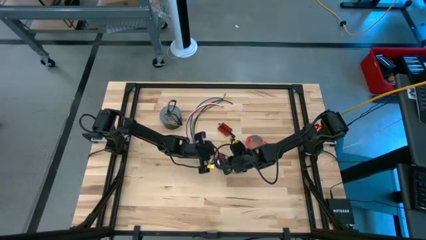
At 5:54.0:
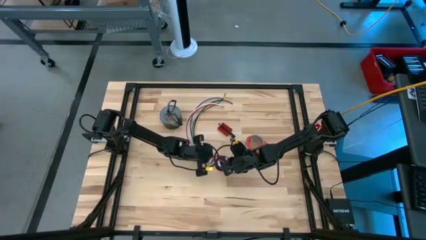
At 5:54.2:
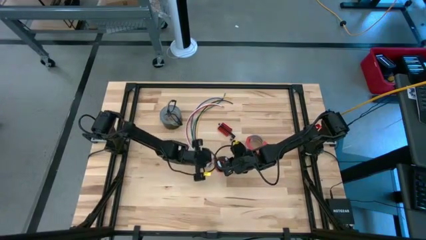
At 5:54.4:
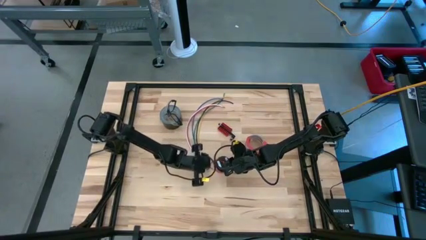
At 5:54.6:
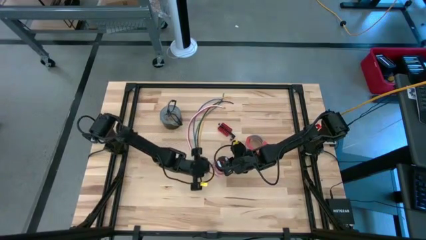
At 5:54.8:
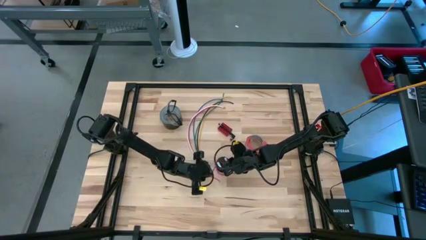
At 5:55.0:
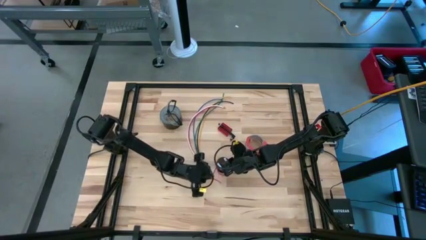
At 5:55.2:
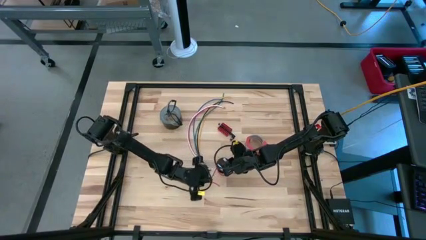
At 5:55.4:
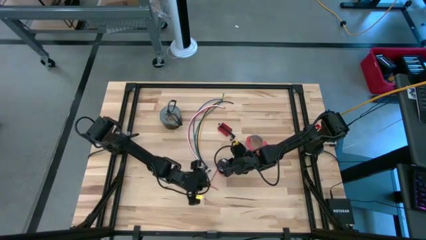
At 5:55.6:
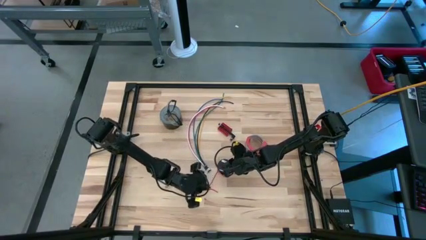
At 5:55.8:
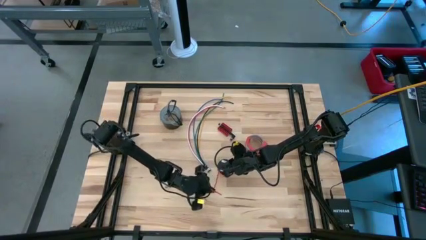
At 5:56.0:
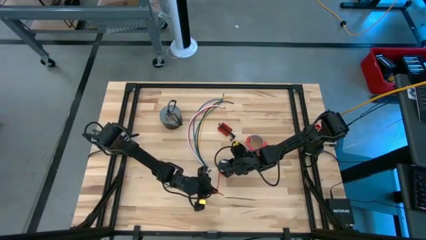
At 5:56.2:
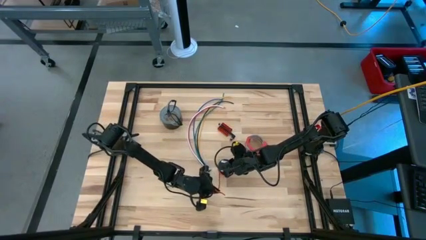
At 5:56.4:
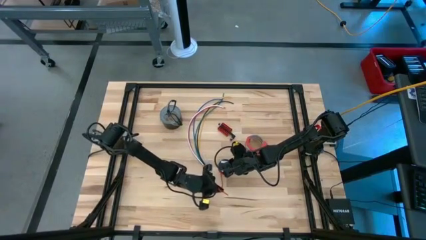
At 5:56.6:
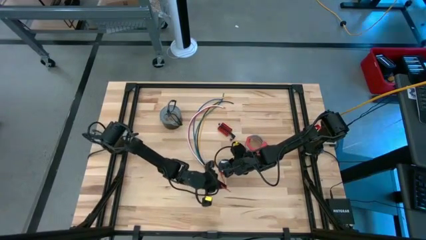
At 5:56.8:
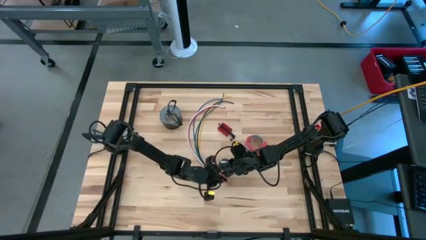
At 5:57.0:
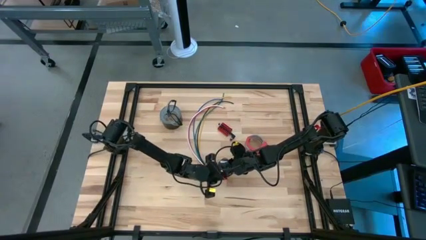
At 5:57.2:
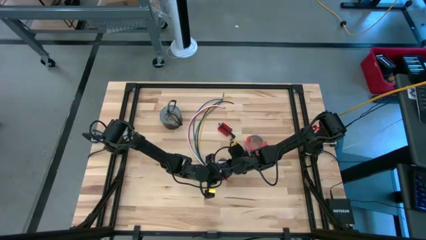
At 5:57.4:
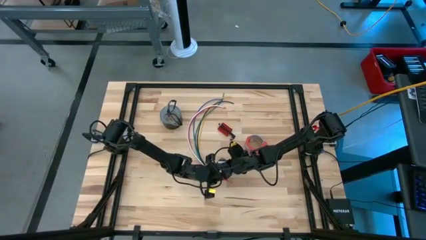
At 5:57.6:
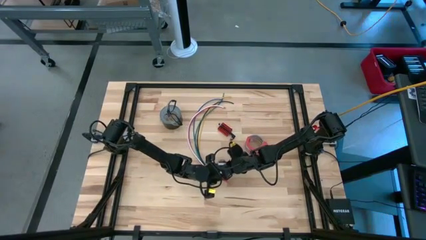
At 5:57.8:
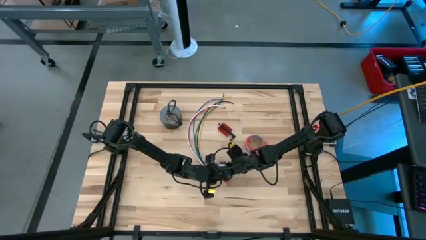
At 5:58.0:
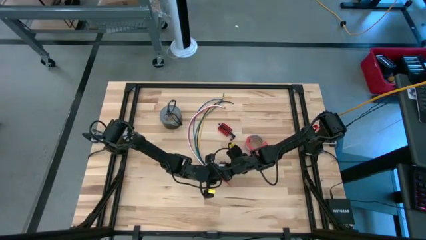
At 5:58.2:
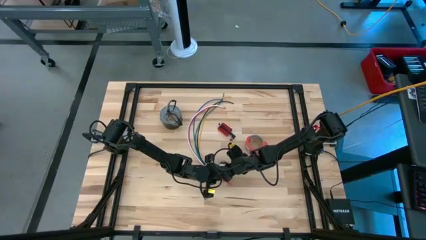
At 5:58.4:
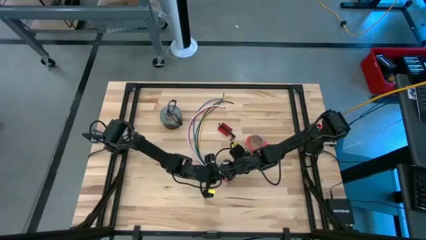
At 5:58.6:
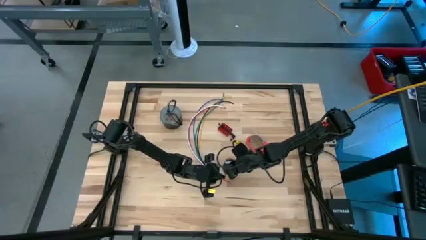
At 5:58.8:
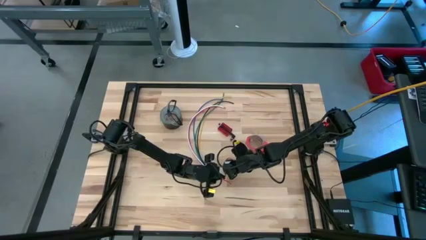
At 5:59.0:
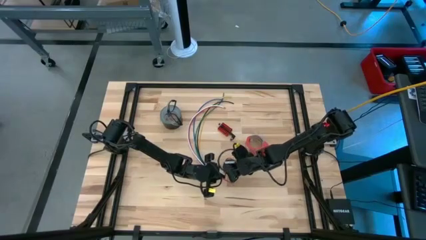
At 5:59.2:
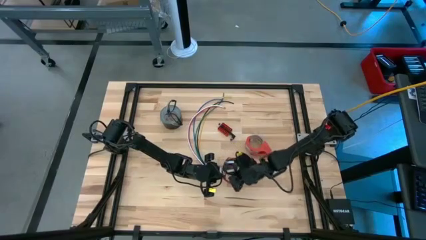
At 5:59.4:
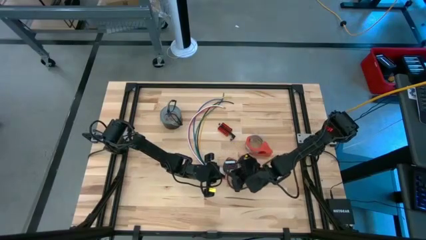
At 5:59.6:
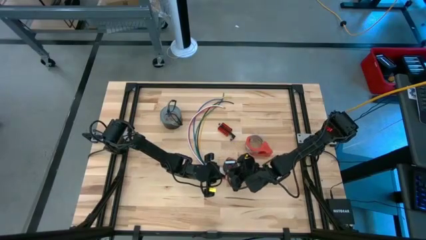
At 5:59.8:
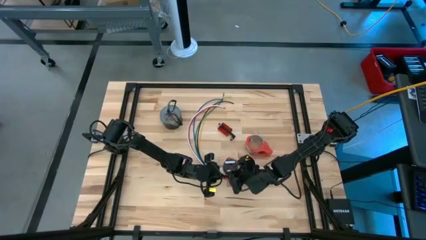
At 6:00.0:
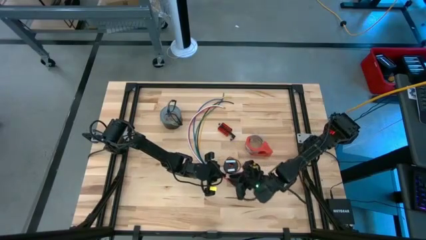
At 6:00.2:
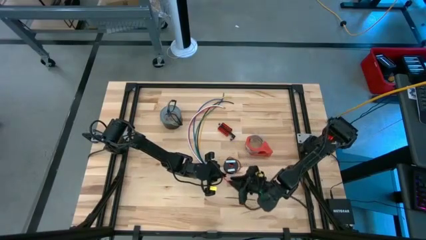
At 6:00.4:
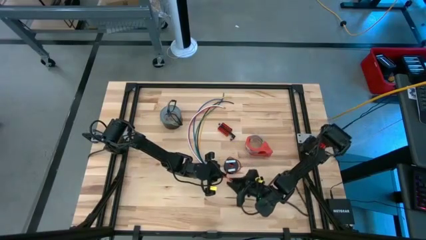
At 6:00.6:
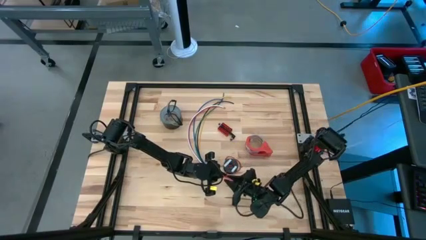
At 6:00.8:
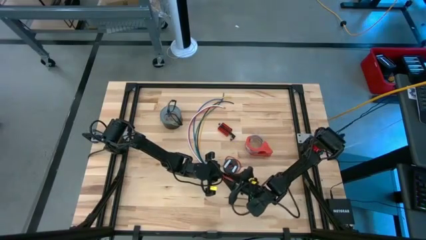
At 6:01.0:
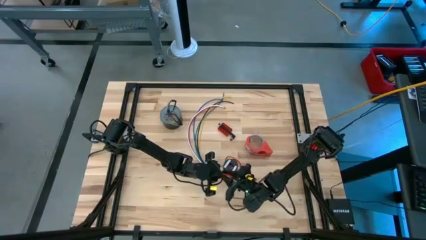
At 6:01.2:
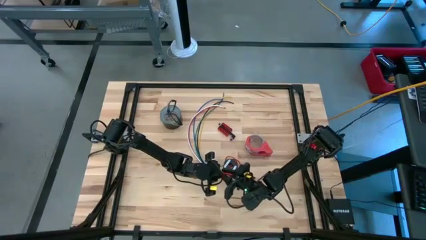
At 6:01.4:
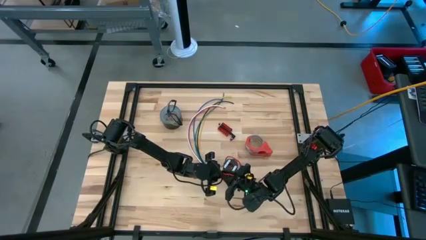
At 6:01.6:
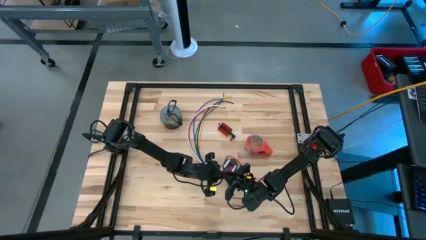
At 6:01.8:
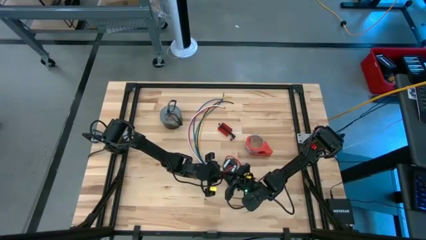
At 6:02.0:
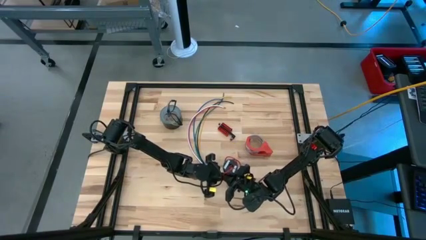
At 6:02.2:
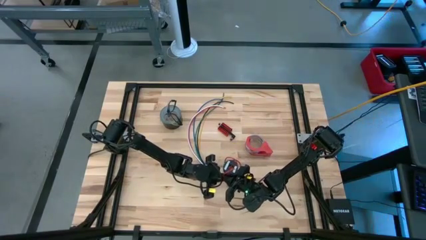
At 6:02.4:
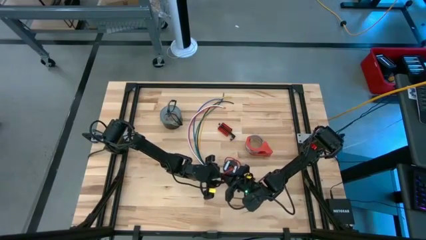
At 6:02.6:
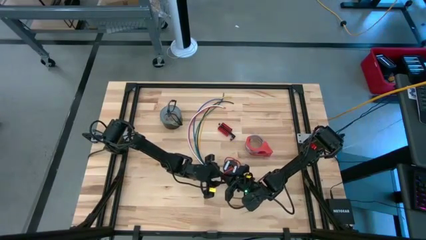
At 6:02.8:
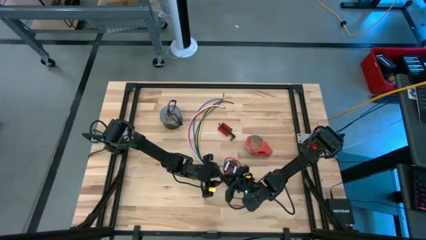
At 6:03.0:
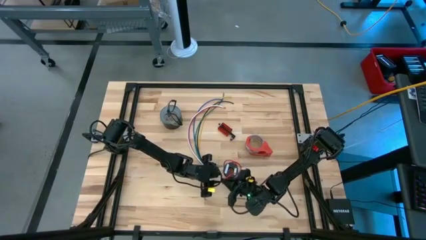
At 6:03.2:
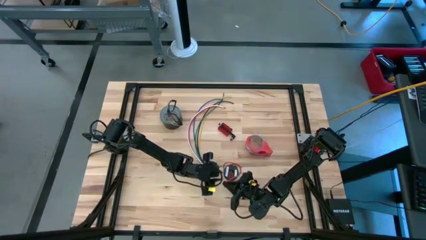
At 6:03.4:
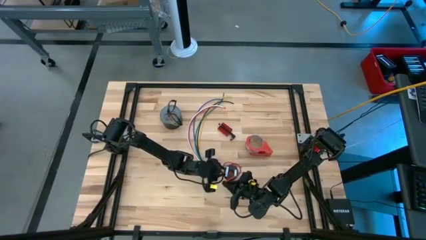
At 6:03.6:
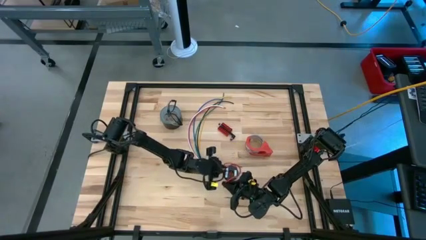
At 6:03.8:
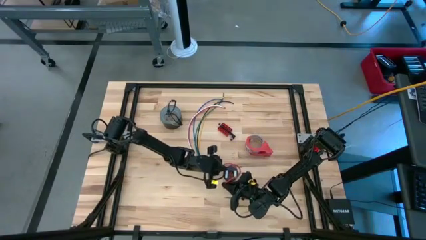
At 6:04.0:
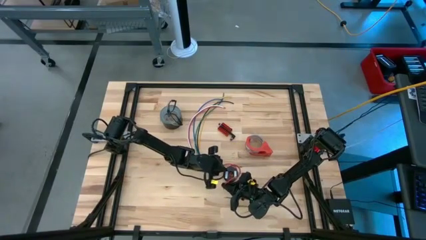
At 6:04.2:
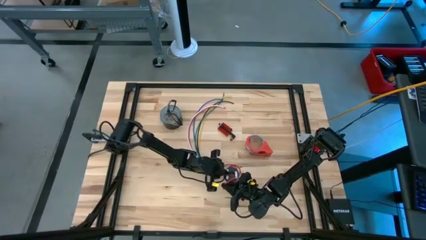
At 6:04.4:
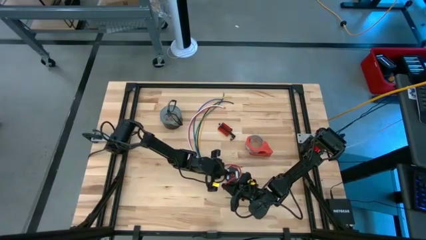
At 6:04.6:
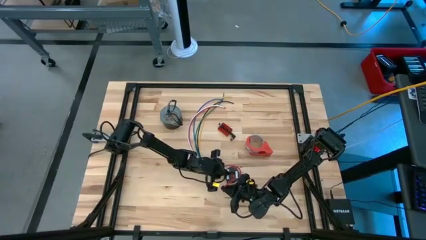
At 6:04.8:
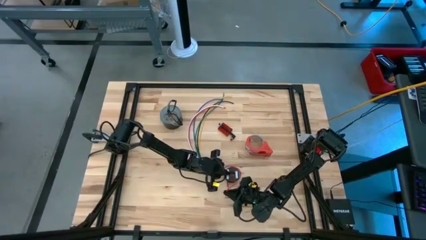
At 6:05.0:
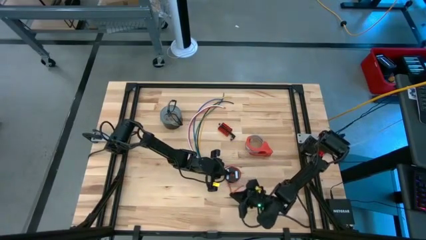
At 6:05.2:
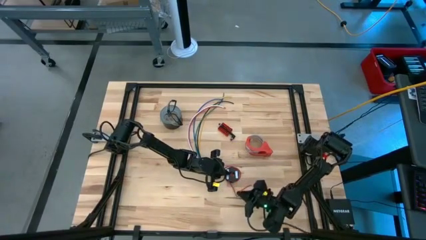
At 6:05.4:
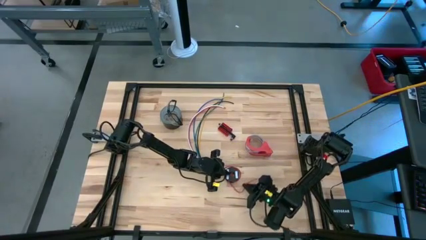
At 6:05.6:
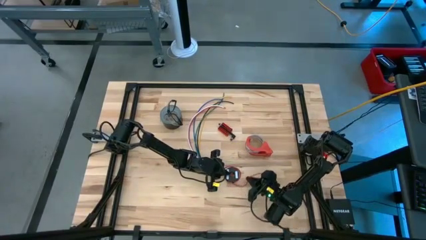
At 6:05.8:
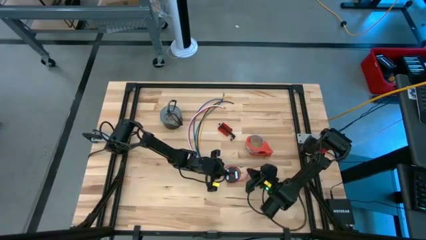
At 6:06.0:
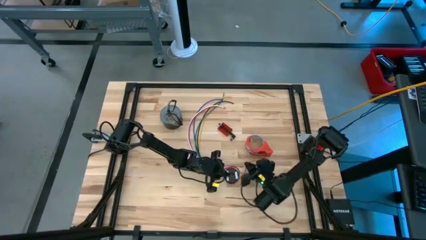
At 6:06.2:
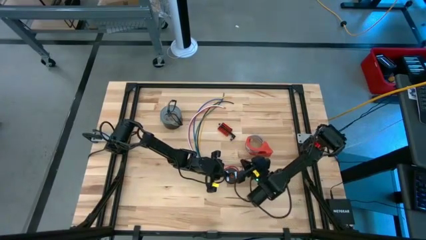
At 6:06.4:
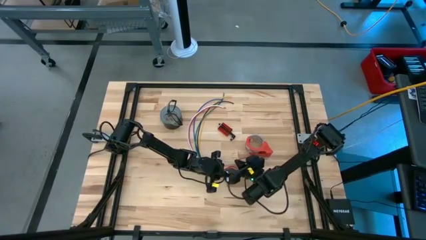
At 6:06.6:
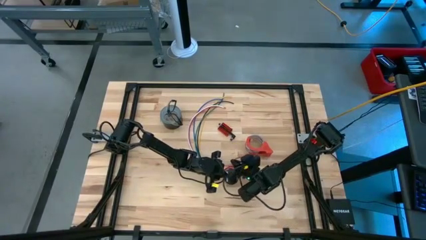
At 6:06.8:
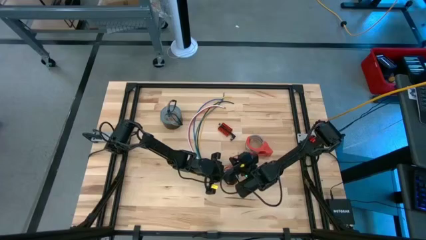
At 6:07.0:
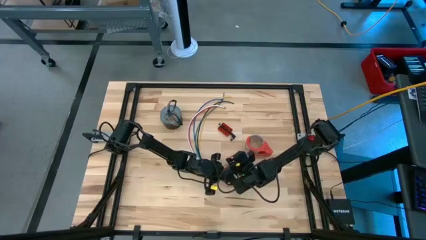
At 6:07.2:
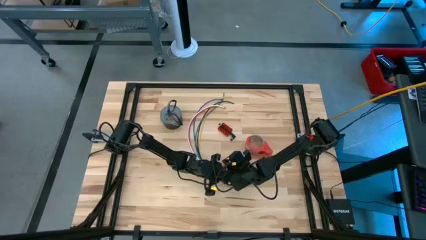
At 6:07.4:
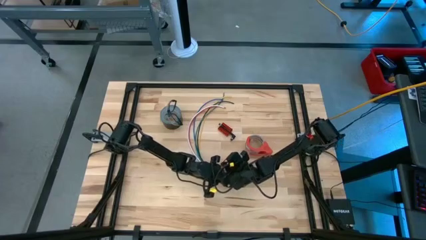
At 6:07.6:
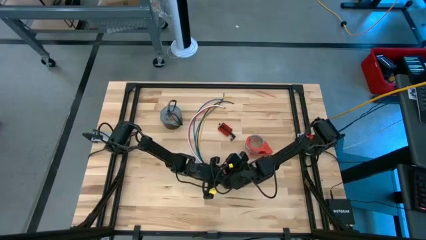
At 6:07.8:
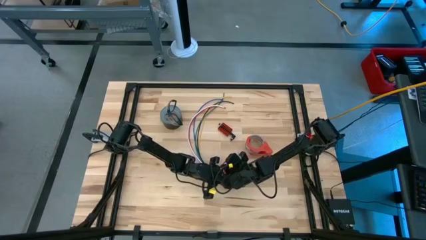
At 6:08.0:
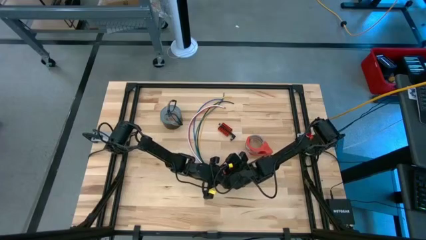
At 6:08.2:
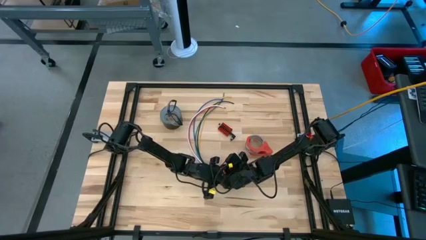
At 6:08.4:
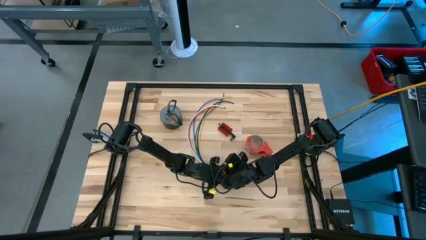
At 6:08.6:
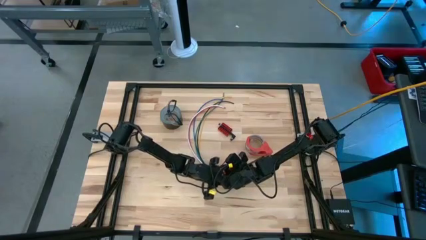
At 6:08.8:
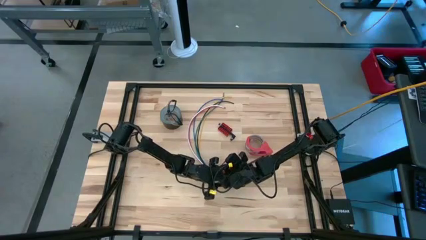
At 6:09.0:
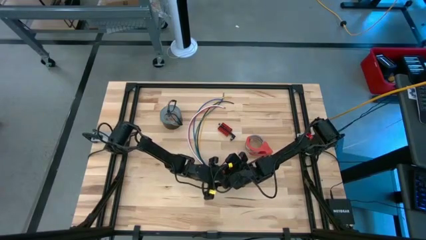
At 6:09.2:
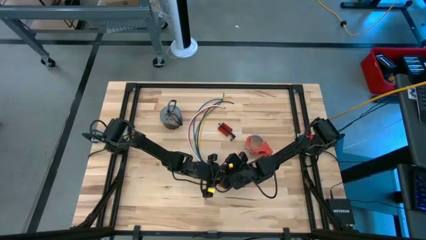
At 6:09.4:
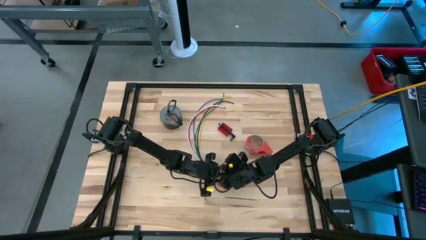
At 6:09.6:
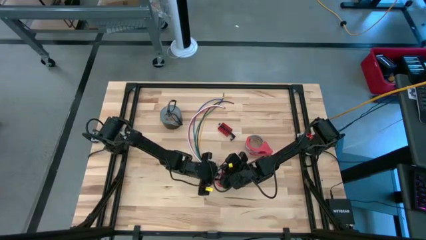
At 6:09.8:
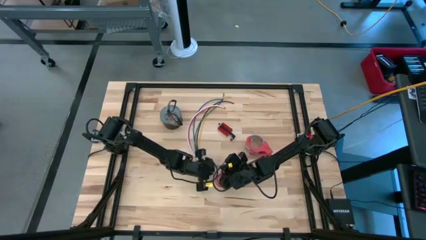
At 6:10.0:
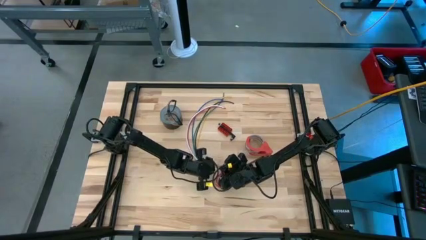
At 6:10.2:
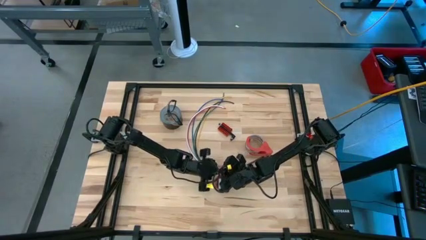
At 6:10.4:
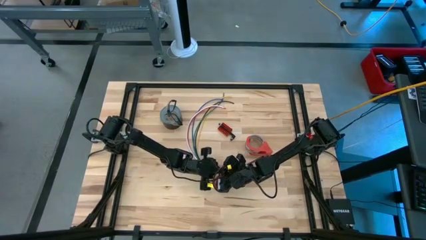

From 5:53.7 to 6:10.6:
Task: Coil cords
Coil the red wire onto the spool
